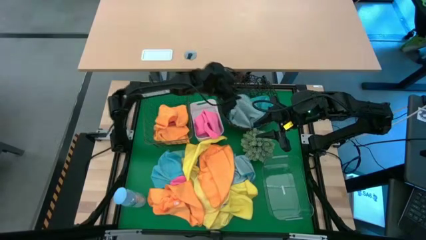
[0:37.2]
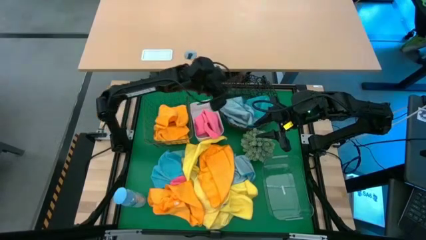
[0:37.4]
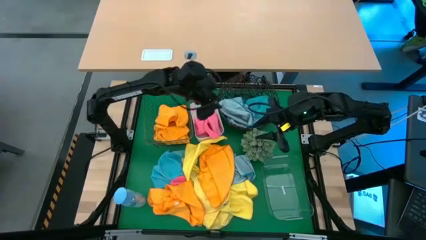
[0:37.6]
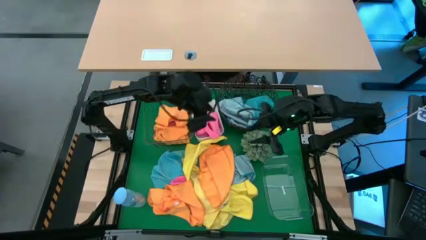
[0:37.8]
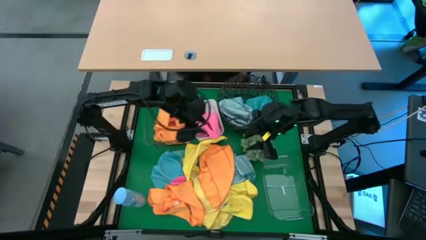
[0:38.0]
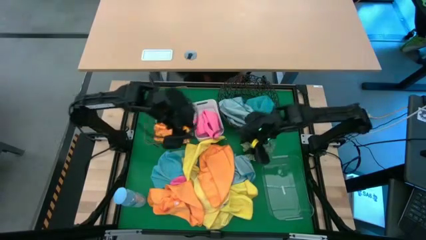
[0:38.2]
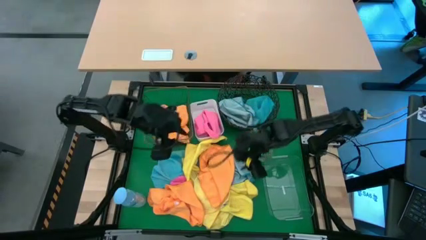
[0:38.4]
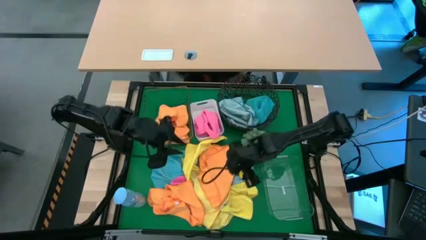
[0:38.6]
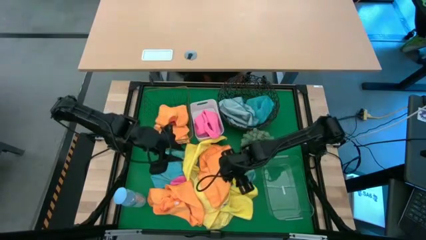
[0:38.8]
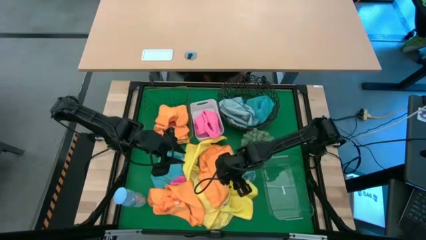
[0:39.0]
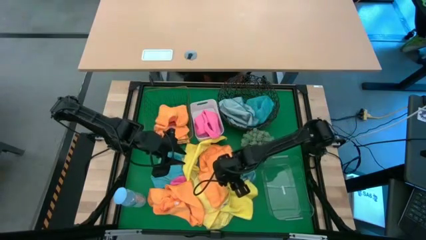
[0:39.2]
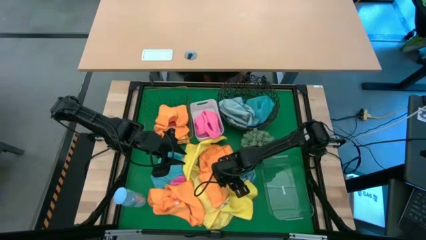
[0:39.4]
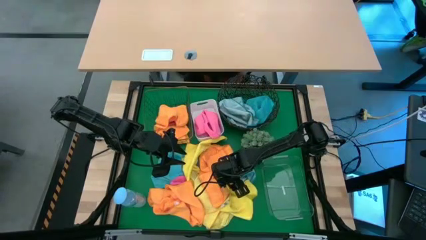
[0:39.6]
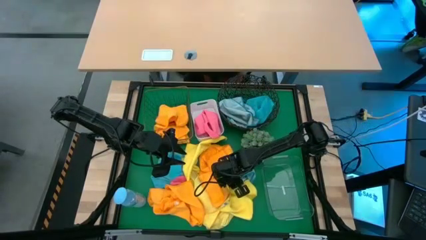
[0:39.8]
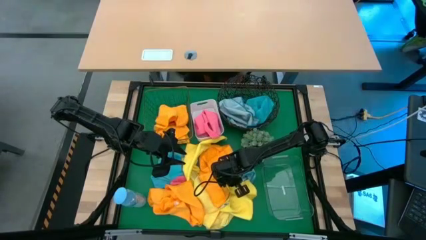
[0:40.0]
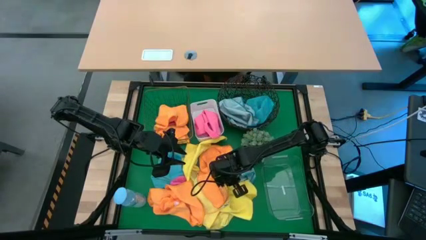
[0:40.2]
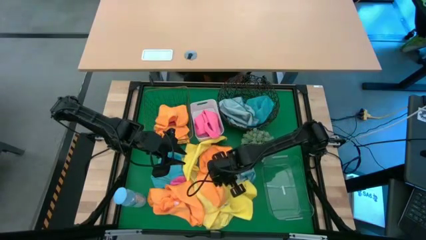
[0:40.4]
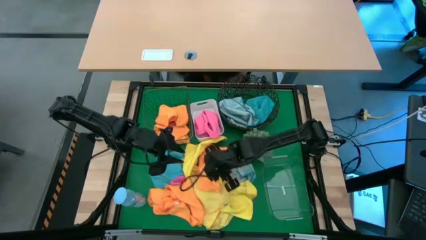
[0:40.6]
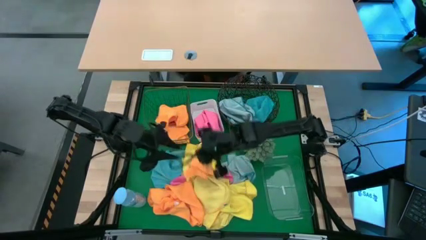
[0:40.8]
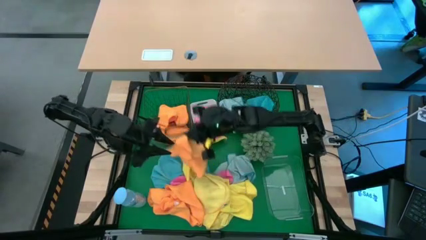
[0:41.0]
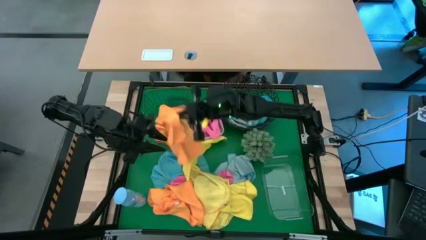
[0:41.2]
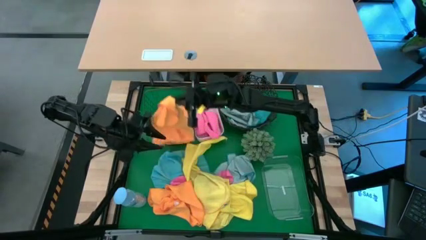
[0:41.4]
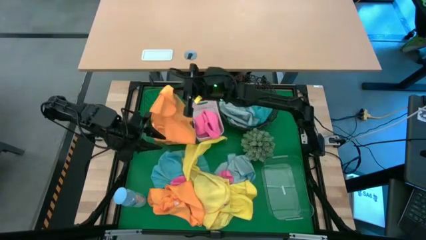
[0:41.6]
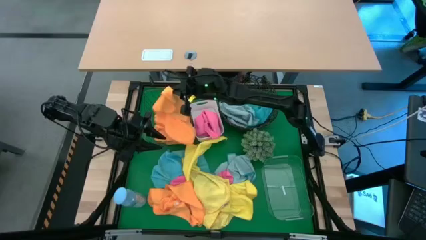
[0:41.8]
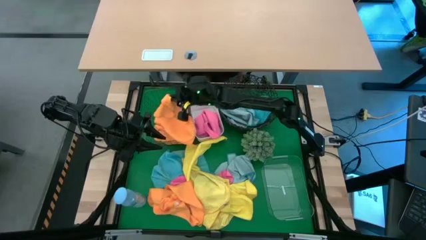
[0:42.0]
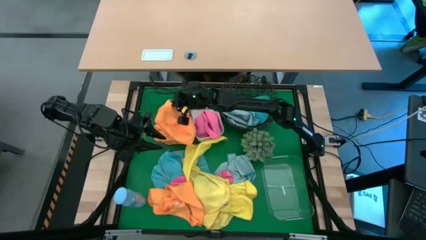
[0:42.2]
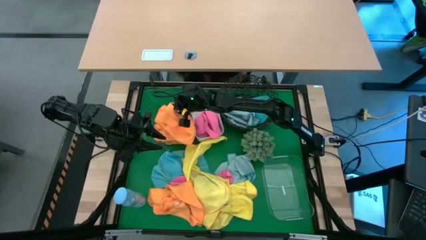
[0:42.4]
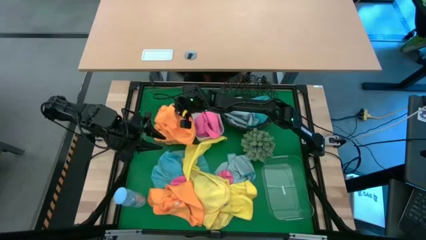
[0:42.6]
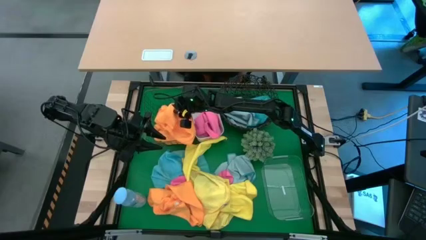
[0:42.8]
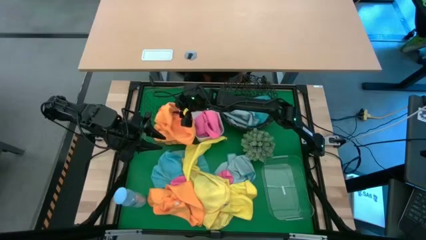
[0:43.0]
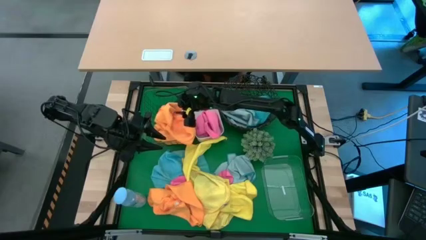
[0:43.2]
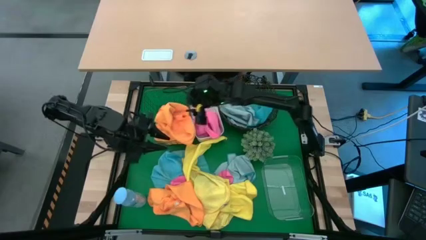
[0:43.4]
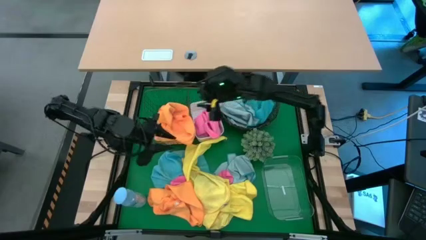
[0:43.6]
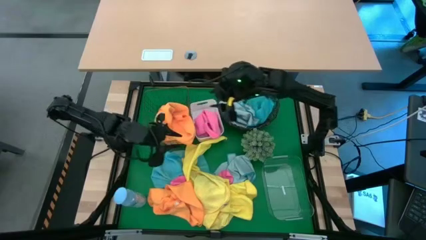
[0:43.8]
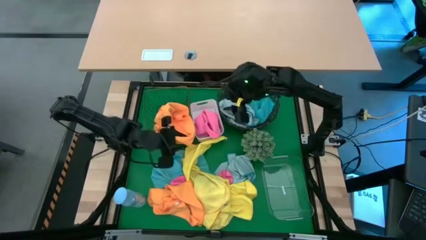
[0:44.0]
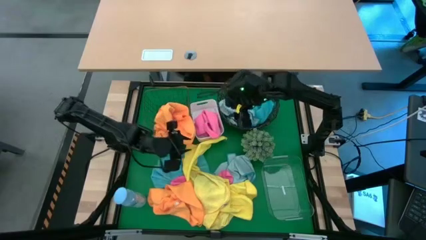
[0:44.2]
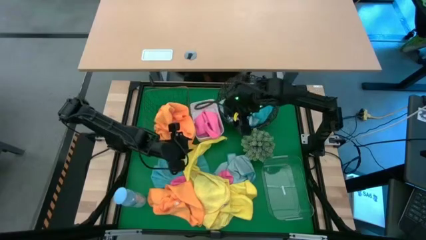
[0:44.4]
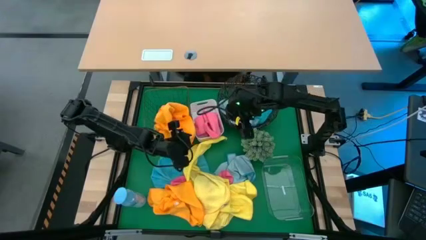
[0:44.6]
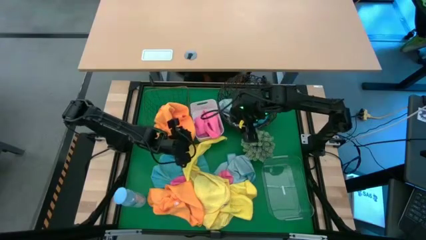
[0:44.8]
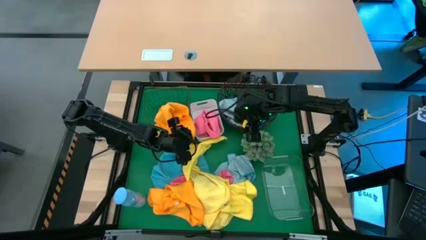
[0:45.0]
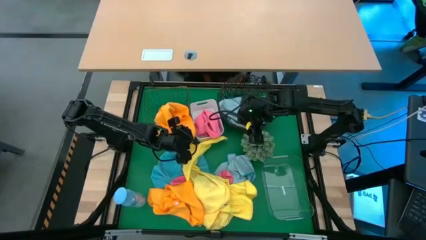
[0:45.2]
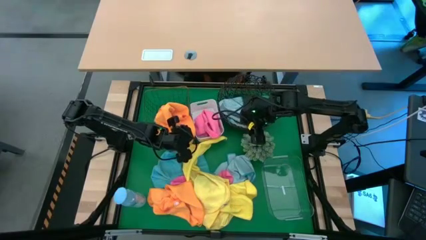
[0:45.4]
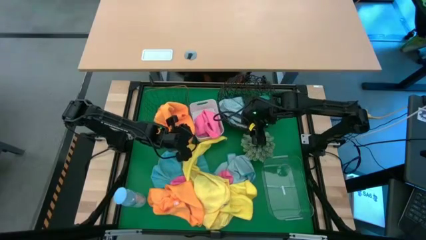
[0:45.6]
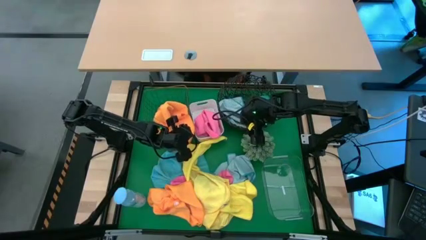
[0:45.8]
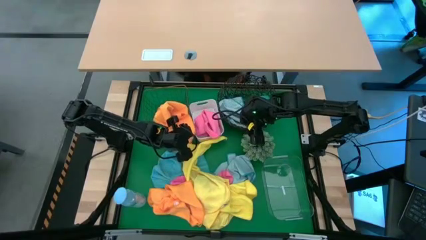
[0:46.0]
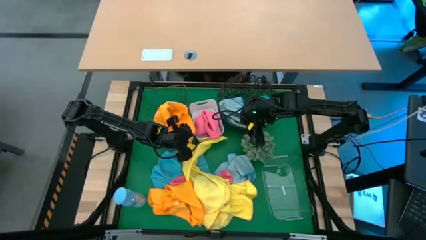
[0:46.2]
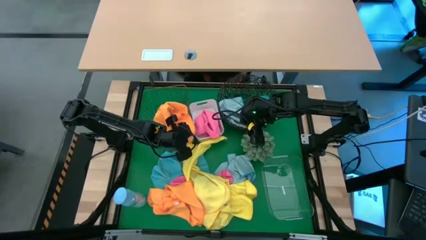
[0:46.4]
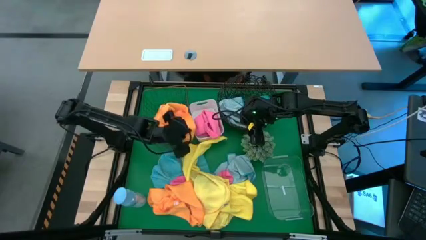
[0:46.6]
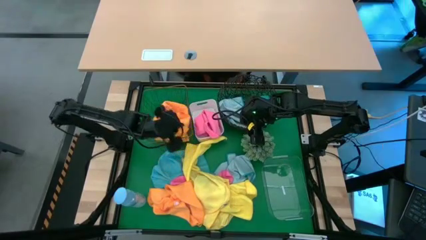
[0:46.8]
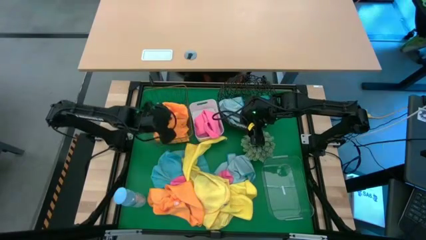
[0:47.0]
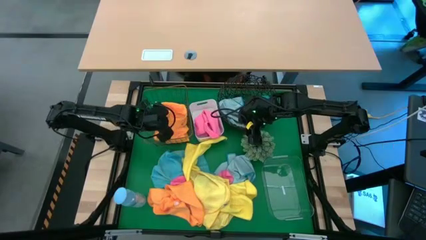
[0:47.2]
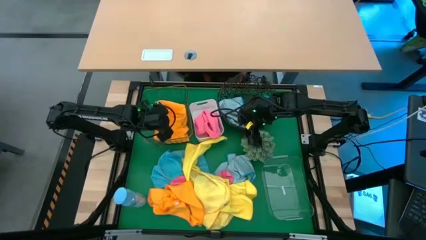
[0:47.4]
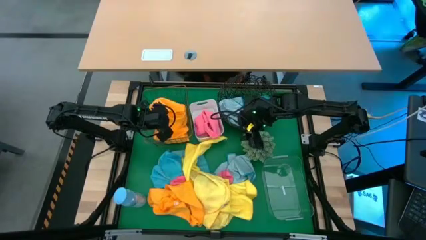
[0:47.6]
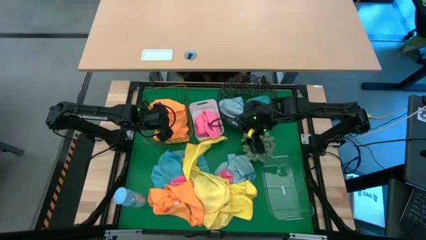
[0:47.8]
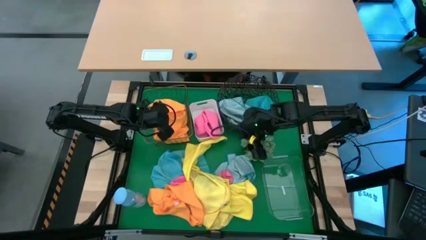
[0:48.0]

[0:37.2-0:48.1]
Task: Sort microfiber towel by color & place in baskets
Put the orange microfiber towel into the gold wire basket

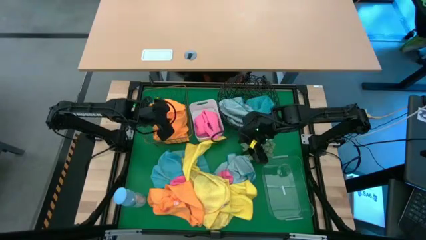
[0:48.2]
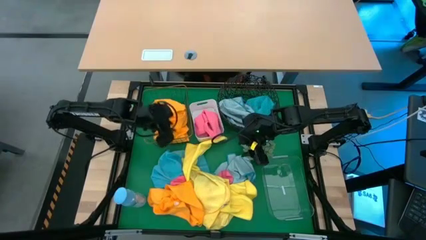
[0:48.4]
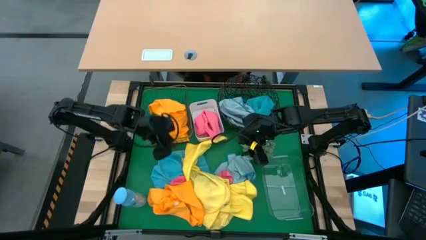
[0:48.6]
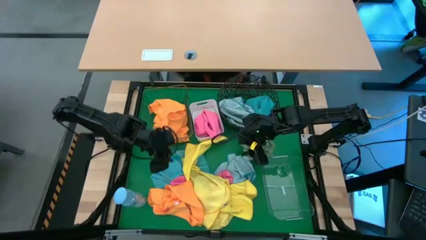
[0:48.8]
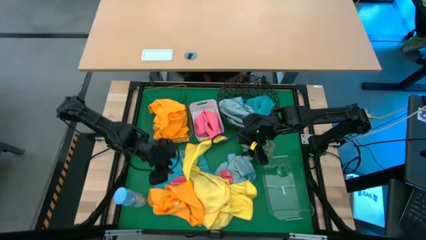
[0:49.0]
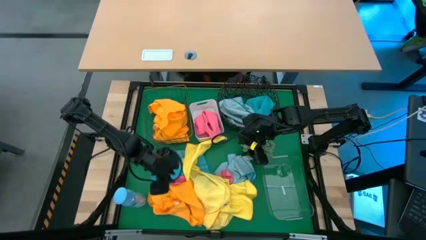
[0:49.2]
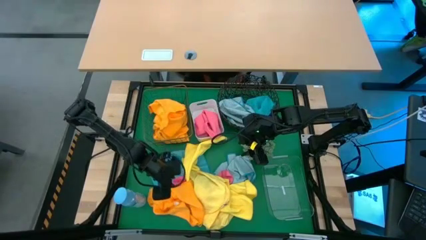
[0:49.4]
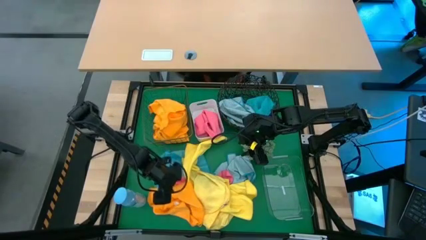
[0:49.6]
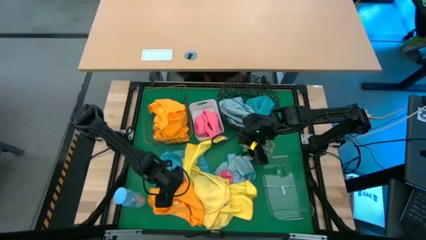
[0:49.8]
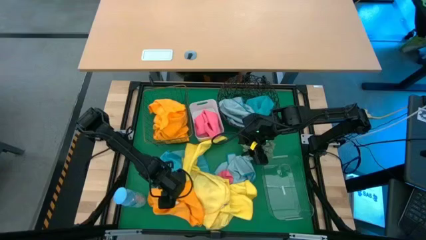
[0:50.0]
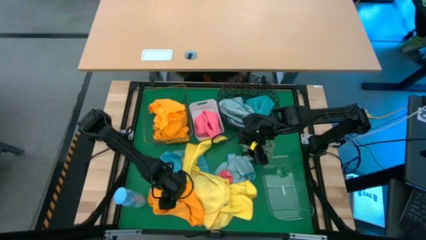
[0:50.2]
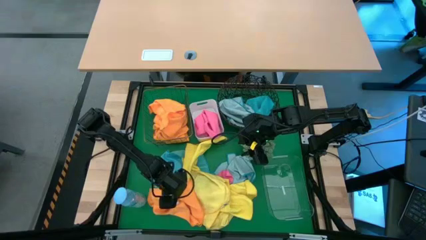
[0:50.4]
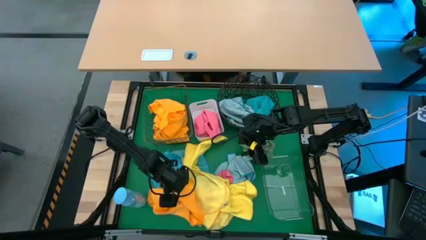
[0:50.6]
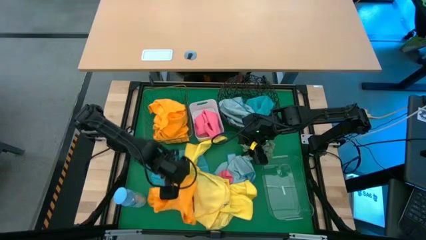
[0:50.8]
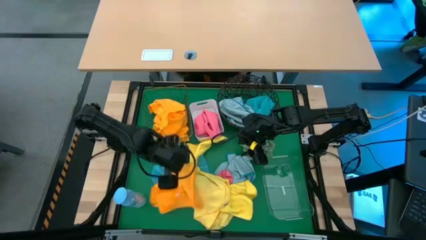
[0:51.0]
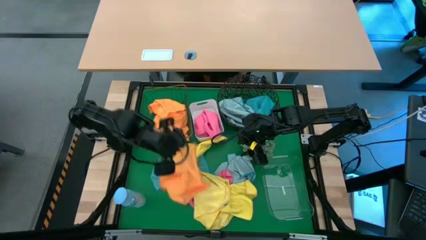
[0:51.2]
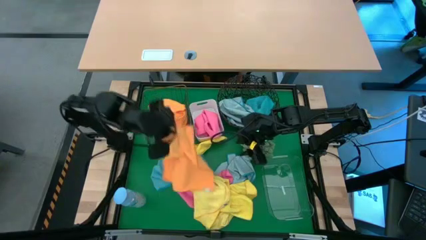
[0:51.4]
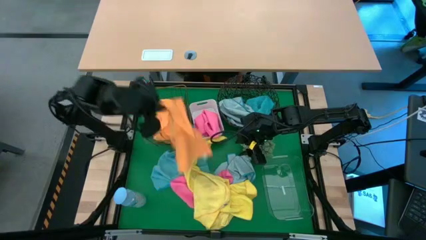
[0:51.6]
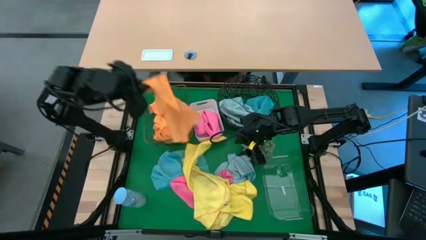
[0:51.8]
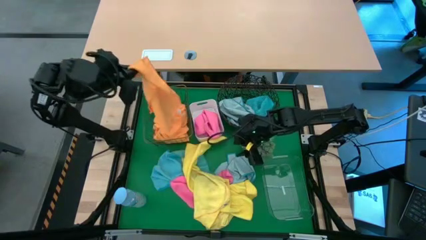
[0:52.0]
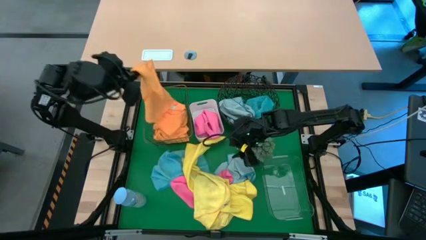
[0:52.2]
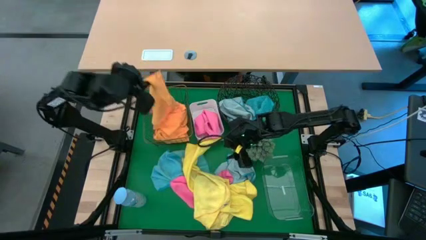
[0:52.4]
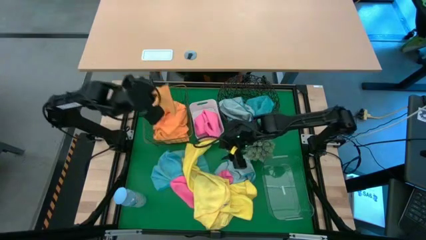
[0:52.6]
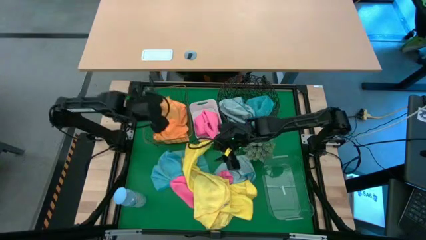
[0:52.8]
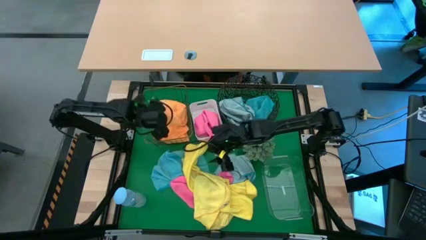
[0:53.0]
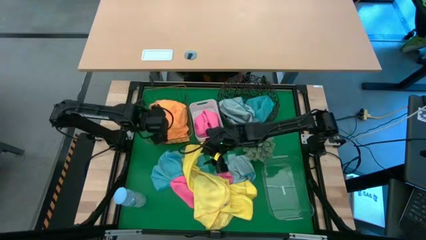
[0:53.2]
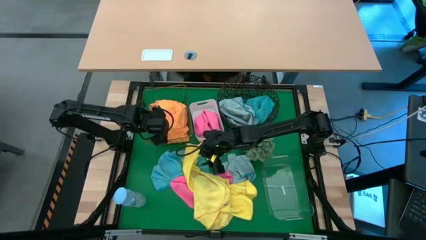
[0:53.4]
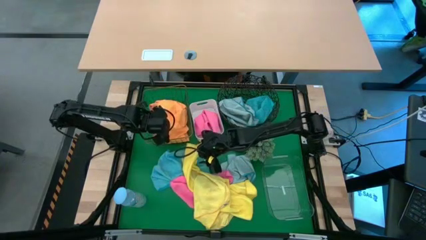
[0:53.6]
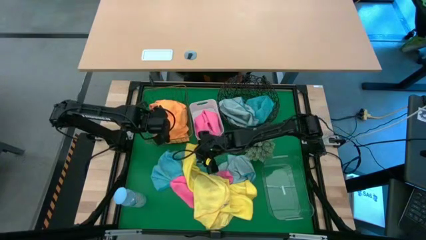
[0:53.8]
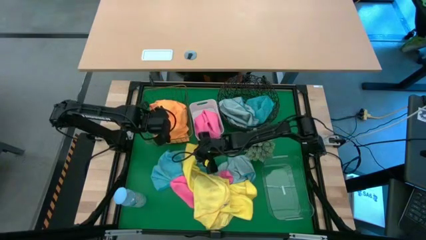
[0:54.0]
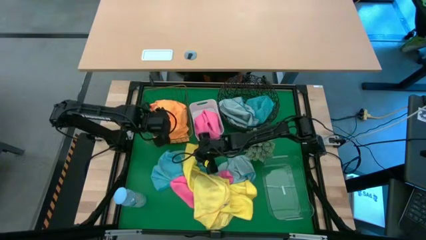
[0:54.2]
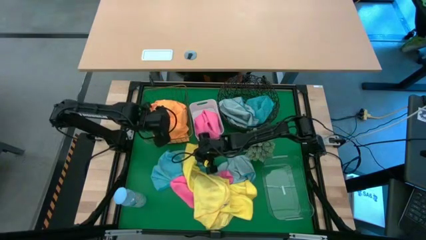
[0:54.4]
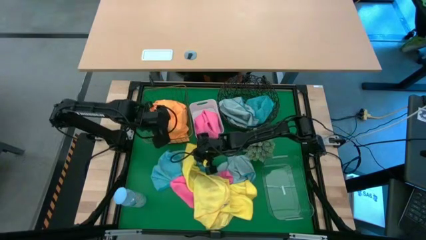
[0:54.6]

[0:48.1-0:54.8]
Put the orange microfiber towel into the gold wire basket
